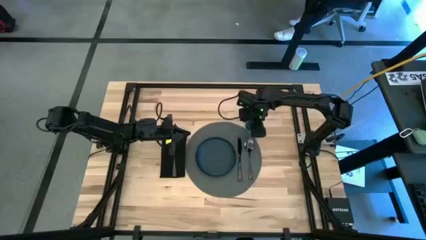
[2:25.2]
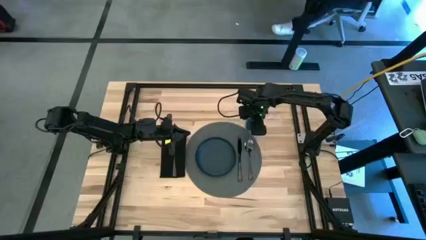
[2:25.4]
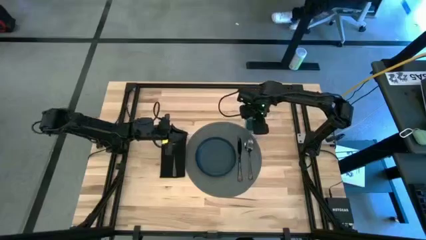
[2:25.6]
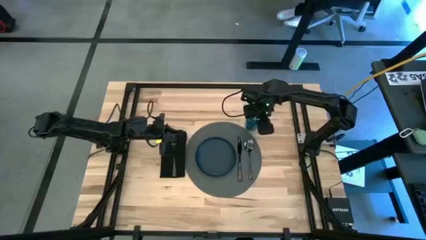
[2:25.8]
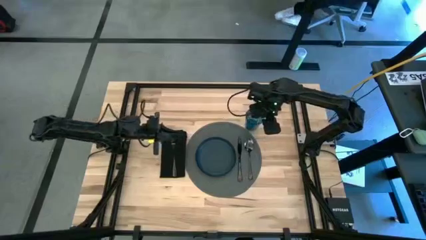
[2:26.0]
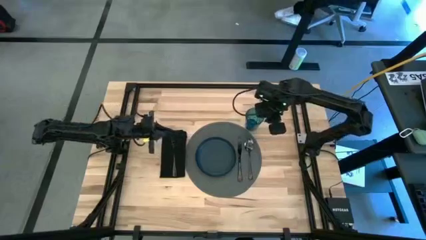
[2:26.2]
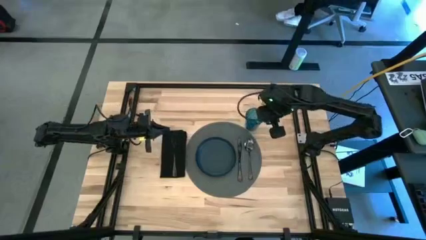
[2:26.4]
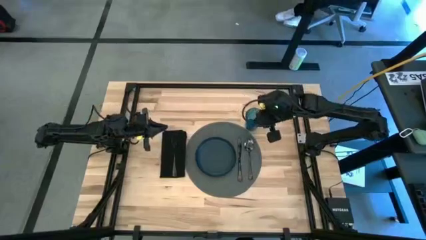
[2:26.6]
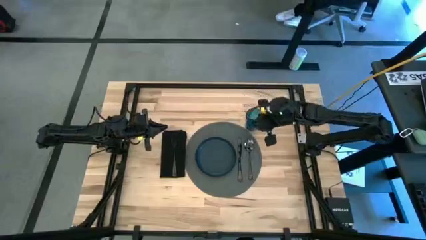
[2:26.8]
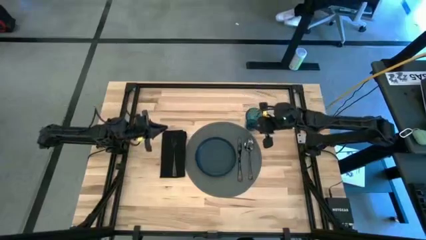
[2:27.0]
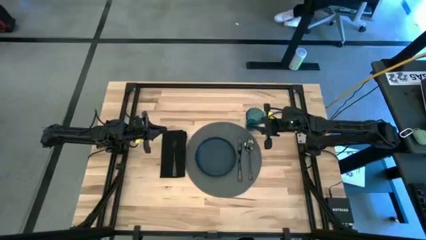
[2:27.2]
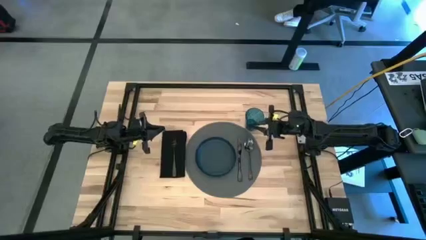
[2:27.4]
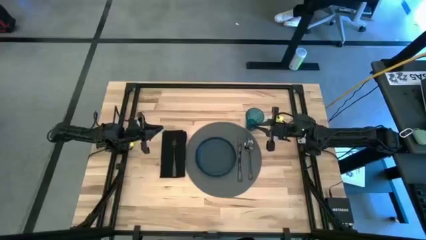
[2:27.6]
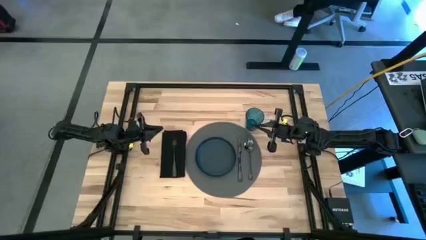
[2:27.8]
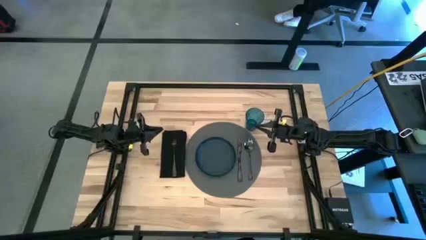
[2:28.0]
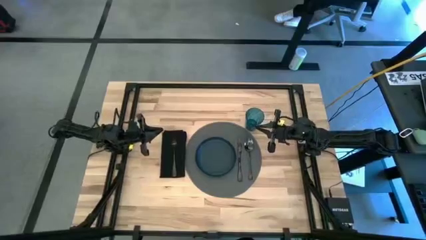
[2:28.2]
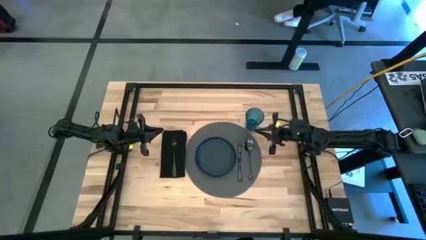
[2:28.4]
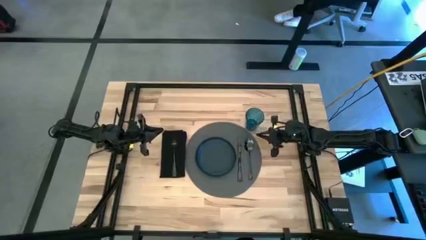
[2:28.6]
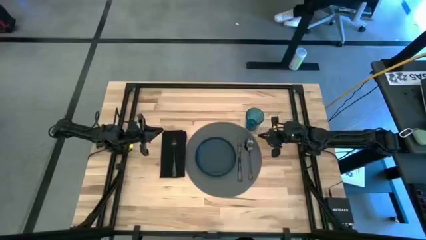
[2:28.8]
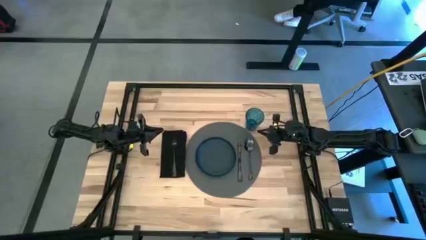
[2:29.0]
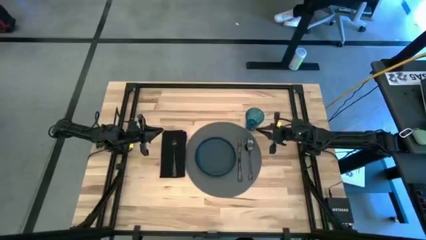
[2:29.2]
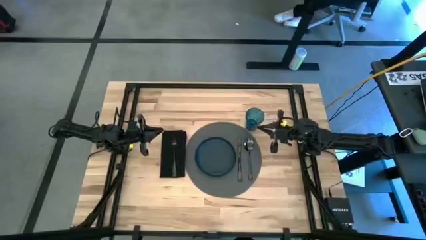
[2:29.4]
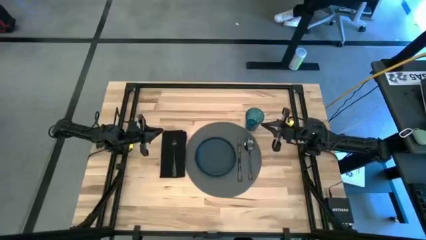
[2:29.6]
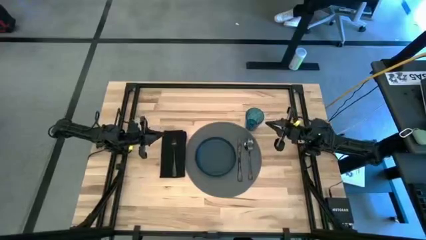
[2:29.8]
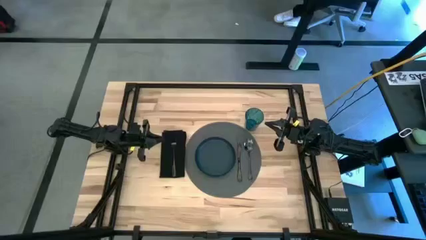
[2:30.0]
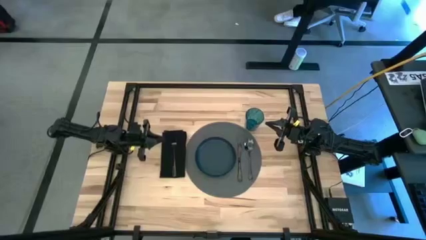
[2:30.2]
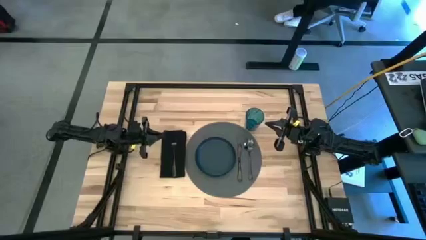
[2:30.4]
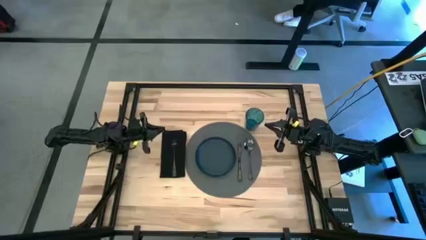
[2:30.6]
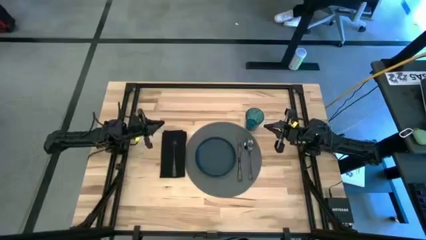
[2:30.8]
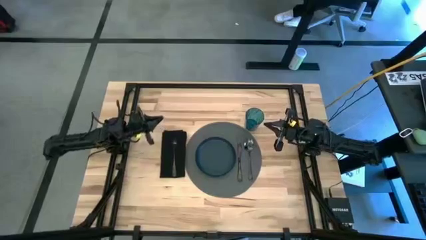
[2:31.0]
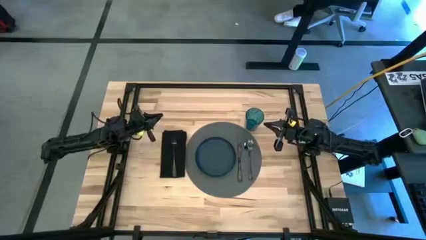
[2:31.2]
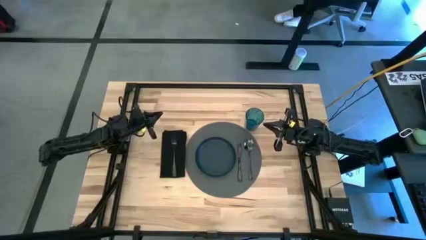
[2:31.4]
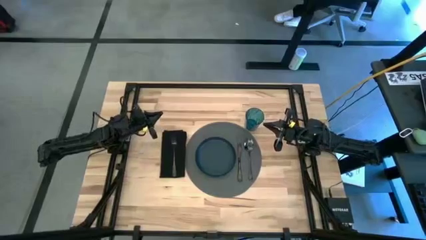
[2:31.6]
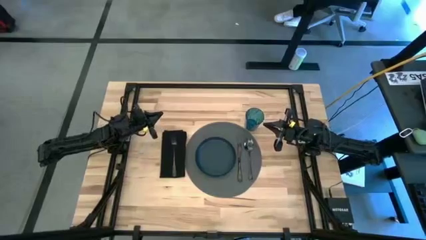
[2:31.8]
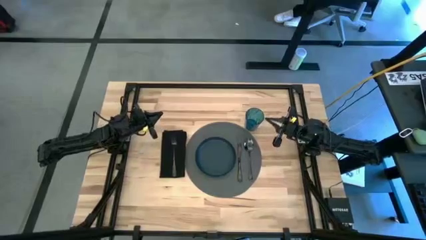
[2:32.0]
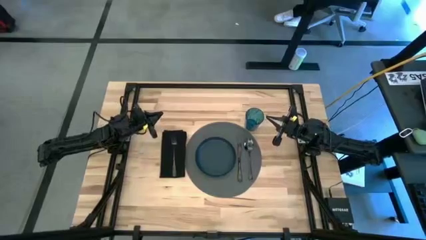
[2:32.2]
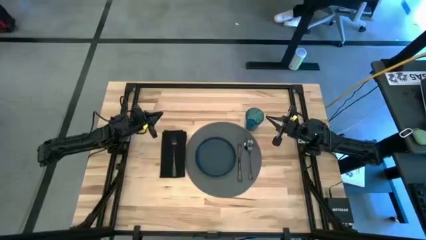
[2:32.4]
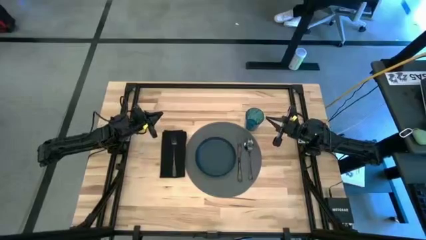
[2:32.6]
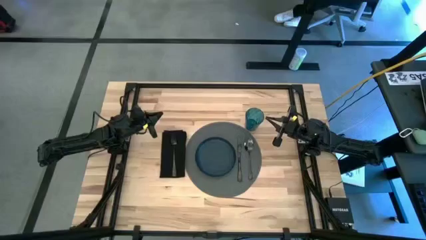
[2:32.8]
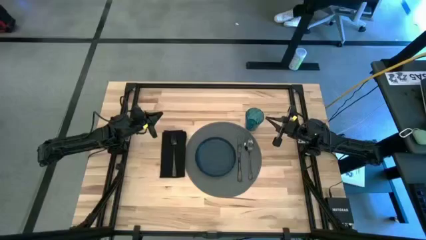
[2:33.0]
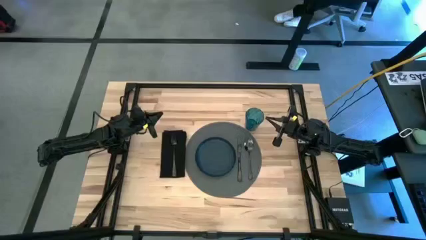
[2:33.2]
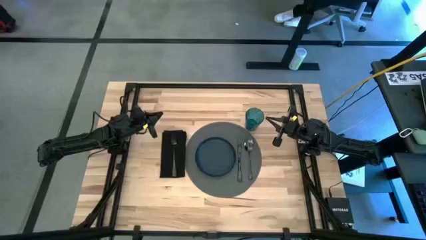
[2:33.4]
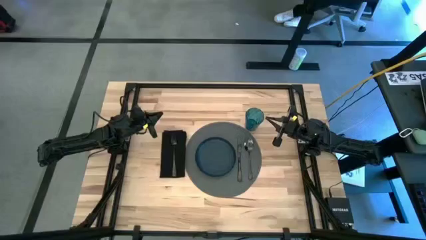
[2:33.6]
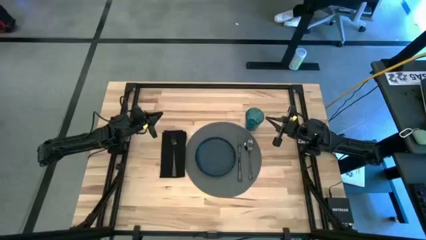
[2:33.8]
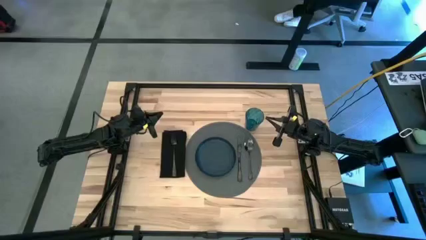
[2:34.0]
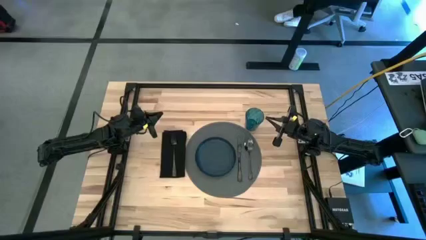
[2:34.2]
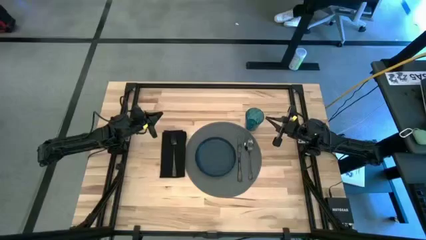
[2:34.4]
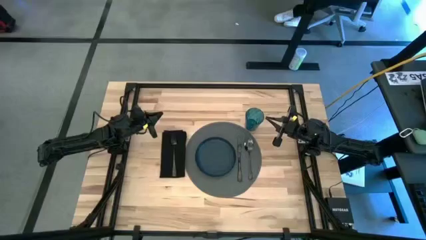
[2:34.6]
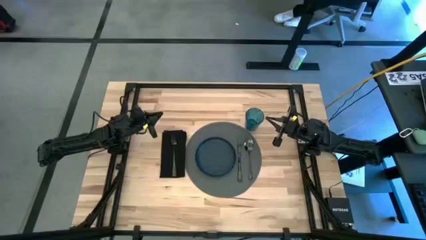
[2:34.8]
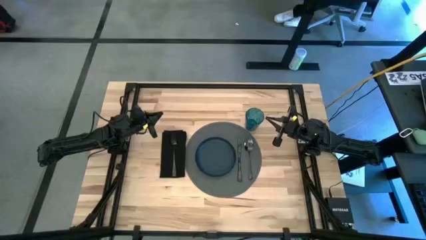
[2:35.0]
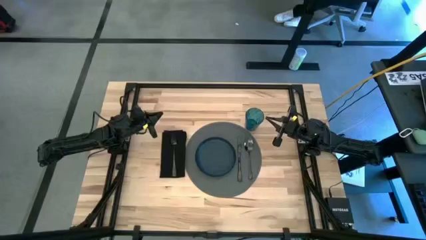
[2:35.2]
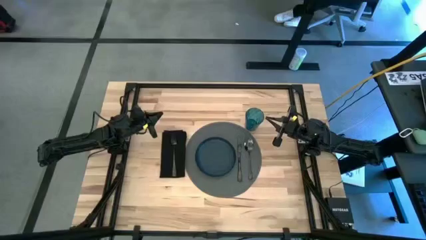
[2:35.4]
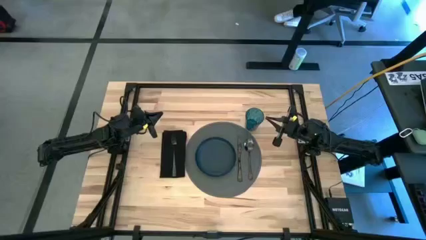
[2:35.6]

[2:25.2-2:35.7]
Task: Set table place
Return to Home Position

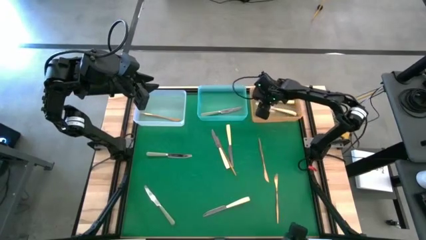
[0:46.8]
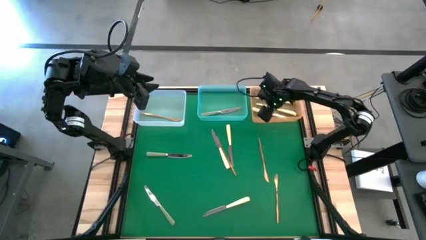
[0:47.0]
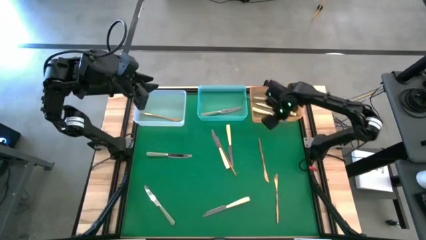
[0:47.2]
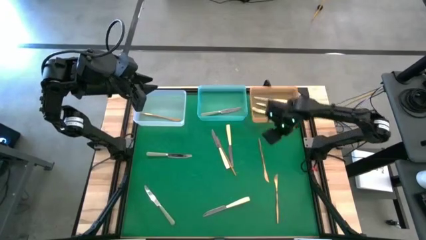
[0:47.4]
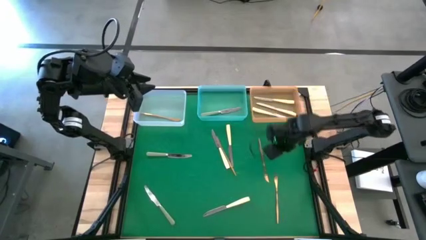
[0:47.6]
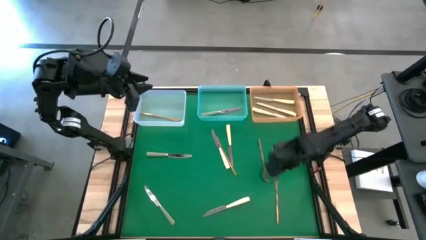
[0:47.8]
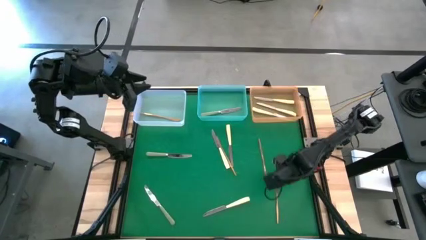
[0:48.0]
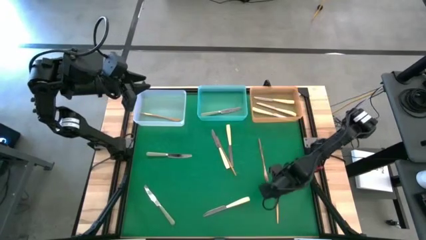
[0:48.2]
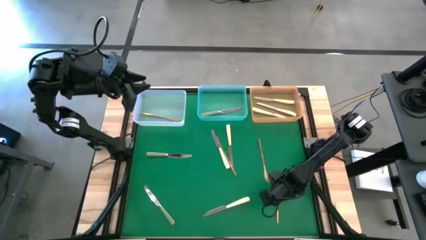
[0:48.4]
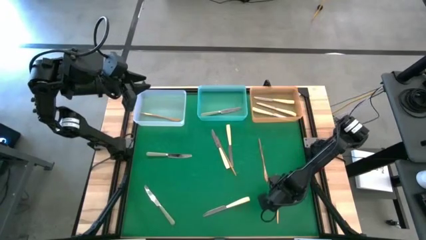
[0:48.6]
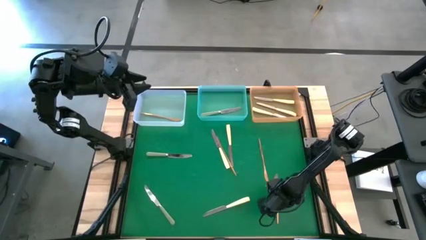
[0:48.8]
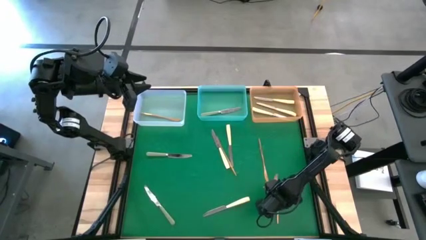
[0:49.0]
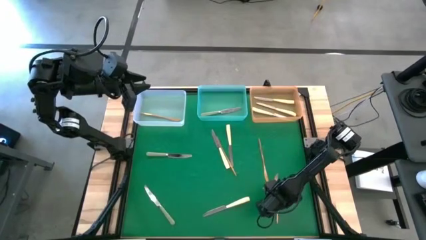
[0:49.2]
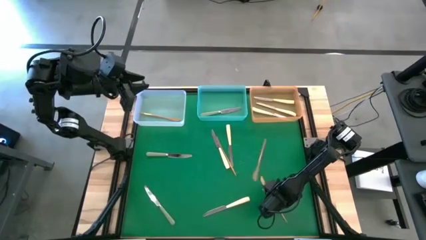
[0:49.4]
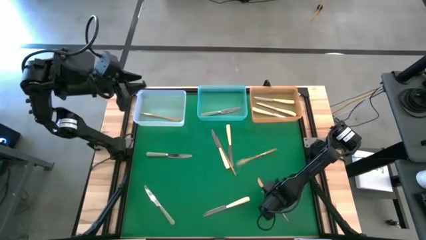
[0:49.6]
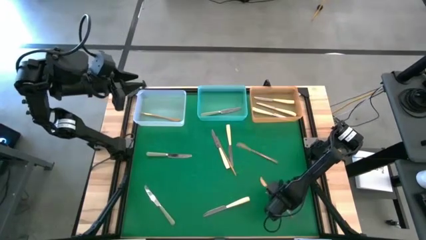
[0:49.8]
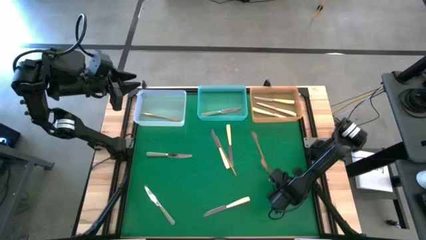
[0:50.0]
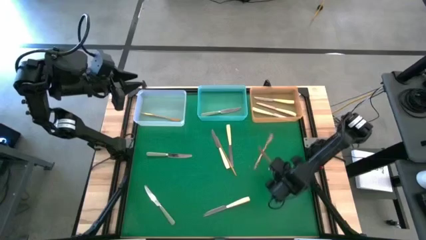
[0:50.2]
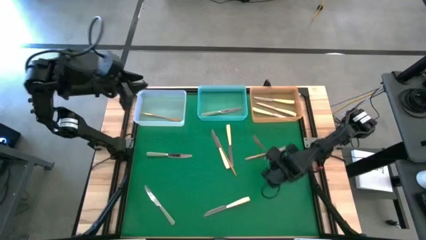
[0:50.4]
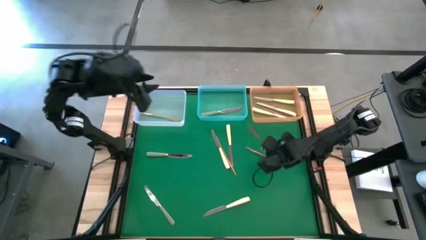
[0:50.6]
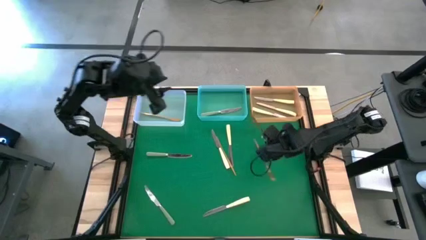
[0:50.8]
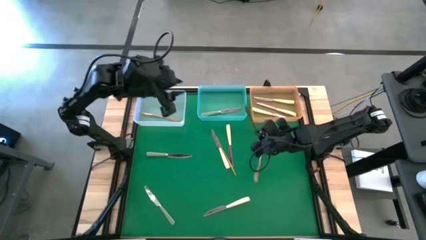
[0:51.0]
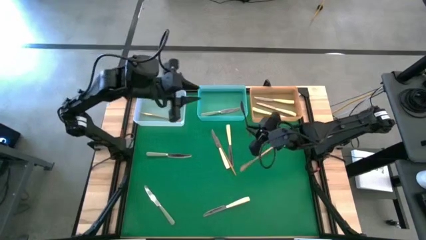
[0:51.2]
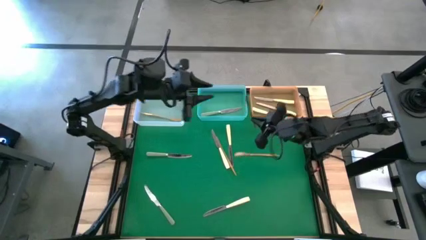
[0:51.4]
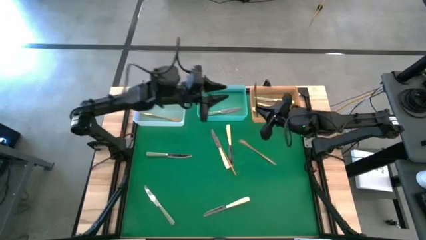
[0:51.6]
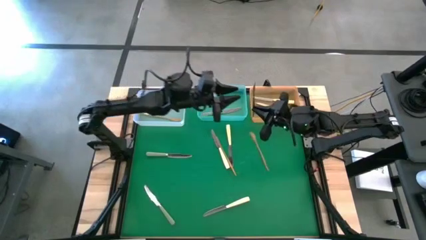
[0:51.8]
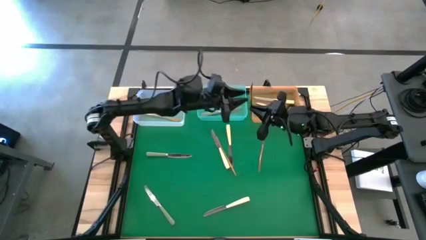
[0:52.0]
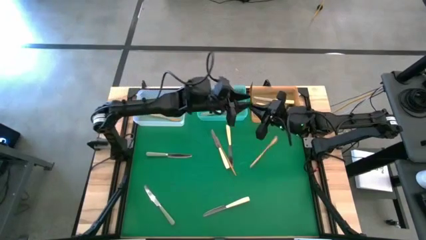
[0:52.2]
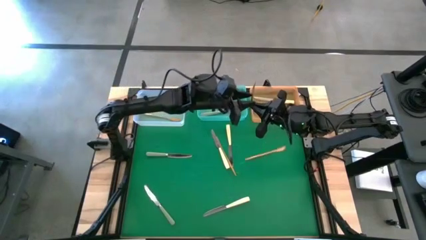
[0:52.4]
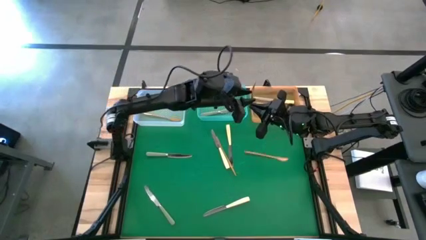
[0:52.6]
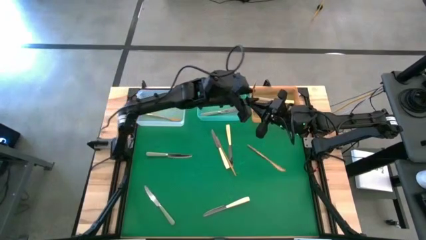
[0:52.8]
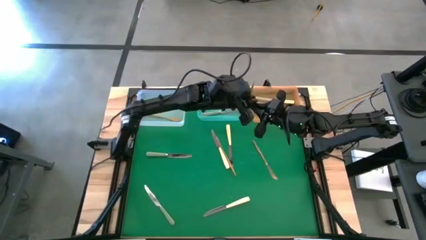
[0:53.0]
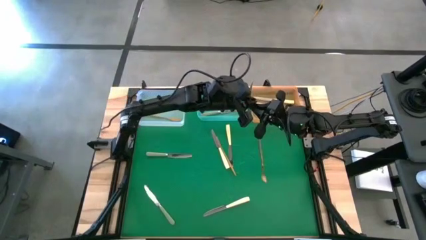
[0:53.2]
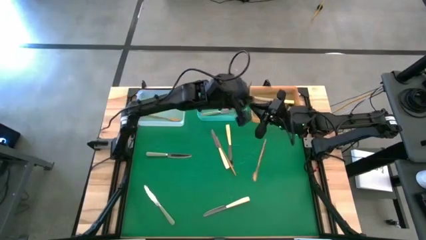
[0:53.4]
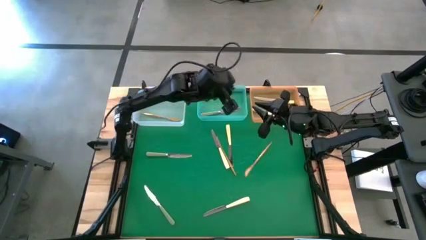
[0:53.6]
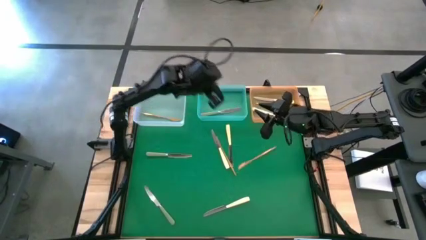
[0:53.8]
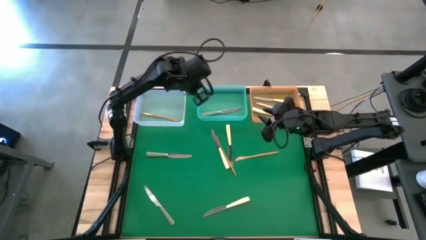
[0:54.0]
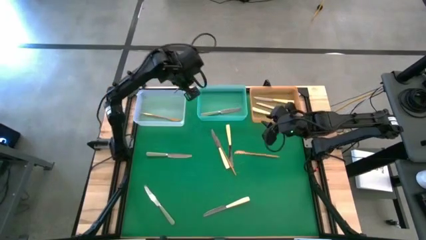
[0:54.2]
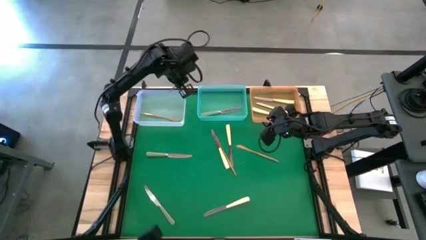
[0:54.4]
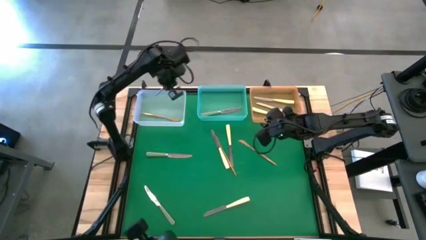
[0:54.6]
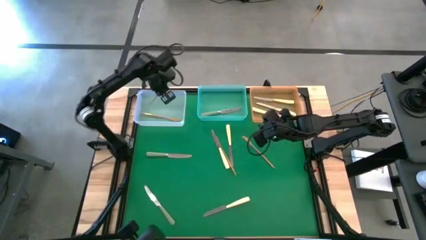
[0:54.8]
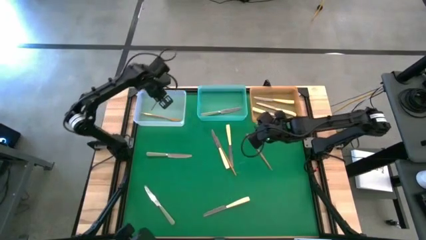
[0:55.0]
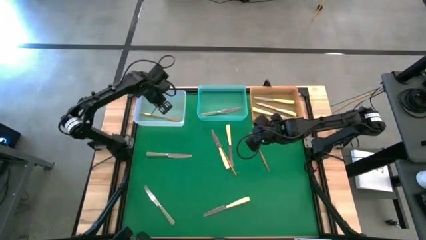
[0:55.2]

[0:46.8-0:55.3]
Task: Sort silverware by color (type)
Put the brown table knife into the white bin
